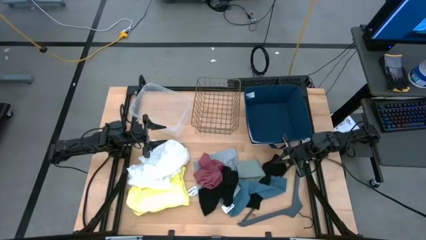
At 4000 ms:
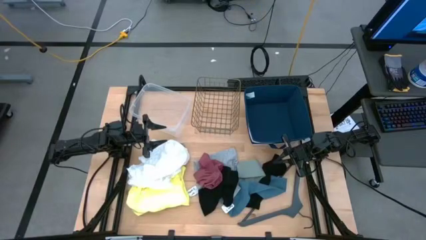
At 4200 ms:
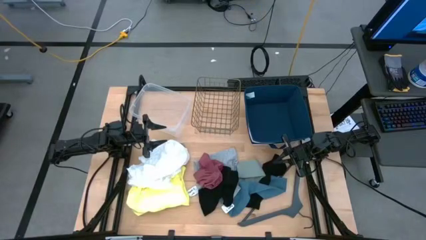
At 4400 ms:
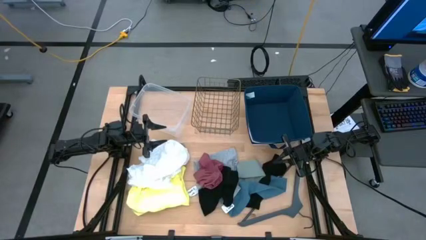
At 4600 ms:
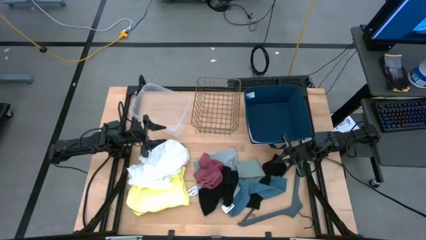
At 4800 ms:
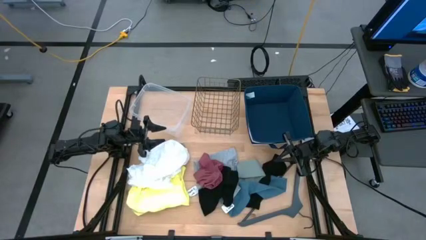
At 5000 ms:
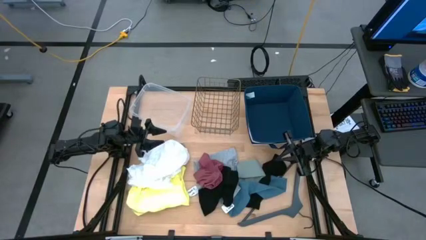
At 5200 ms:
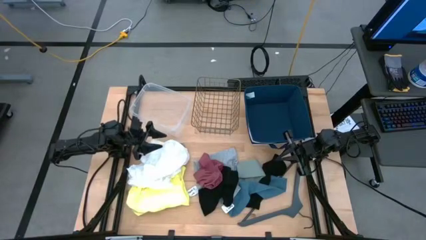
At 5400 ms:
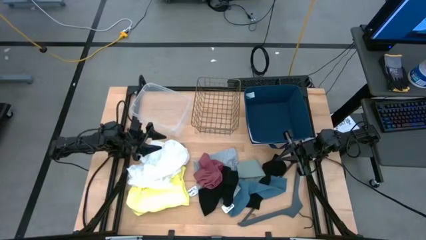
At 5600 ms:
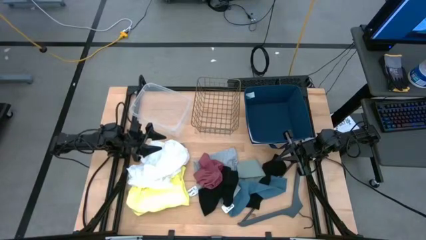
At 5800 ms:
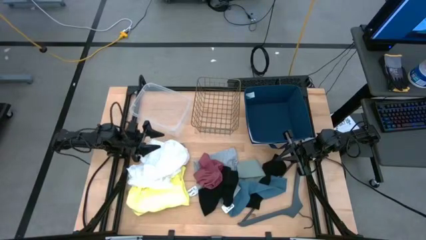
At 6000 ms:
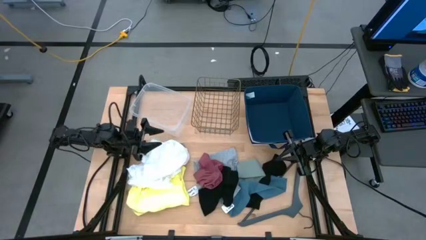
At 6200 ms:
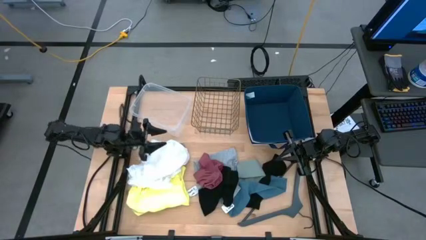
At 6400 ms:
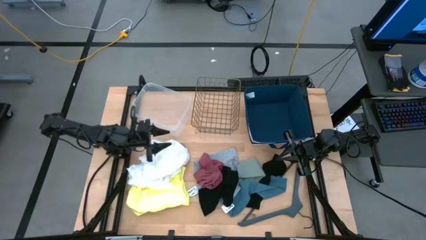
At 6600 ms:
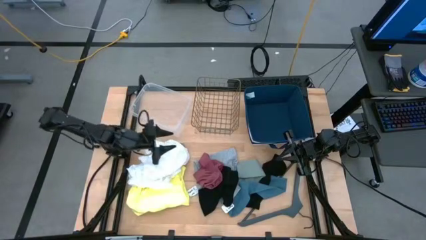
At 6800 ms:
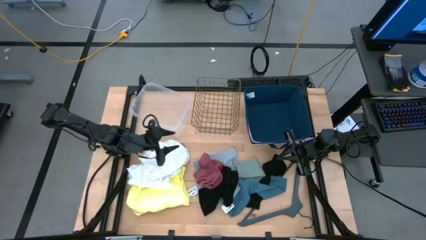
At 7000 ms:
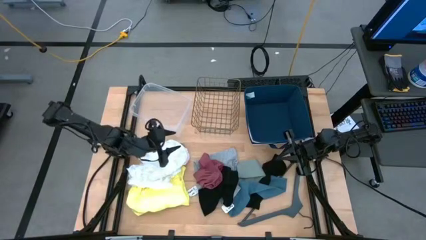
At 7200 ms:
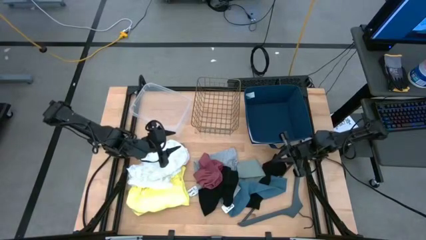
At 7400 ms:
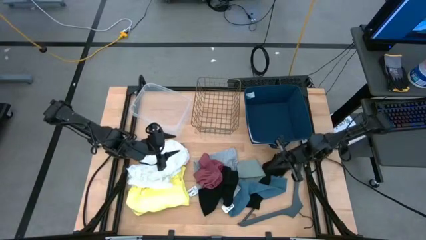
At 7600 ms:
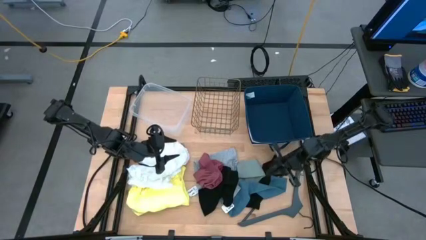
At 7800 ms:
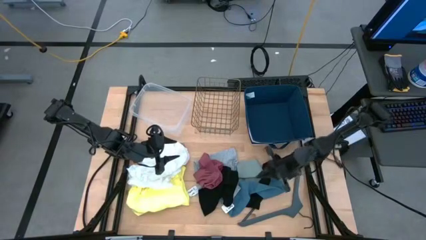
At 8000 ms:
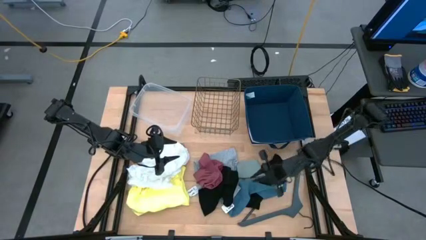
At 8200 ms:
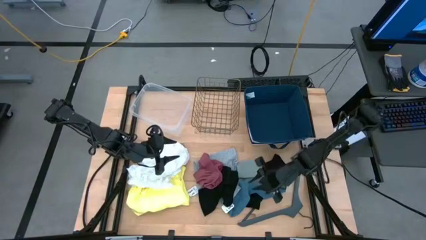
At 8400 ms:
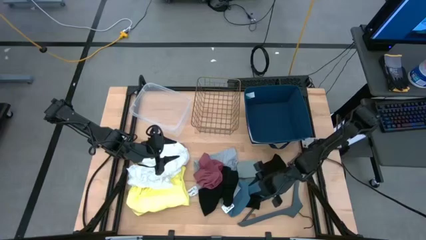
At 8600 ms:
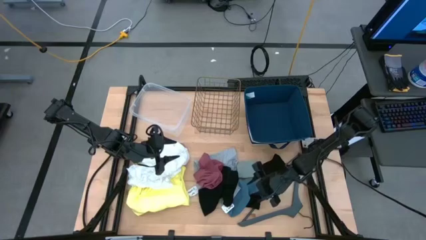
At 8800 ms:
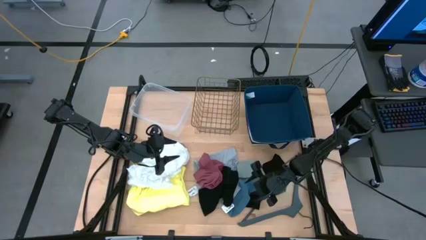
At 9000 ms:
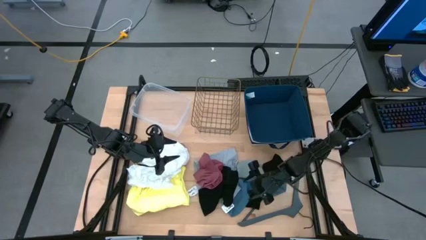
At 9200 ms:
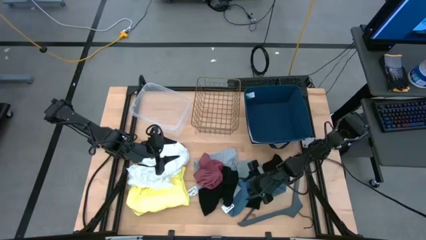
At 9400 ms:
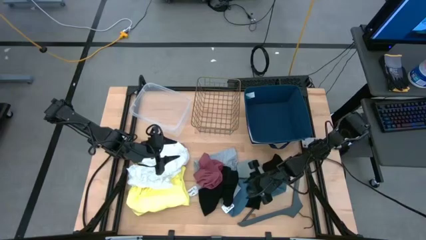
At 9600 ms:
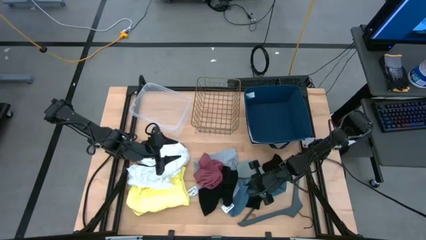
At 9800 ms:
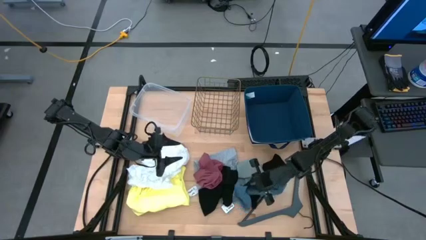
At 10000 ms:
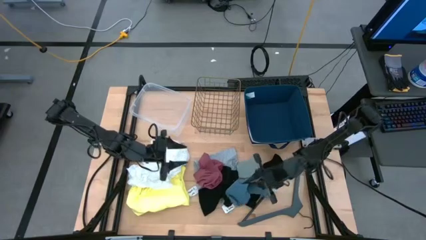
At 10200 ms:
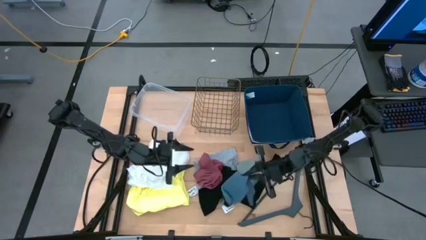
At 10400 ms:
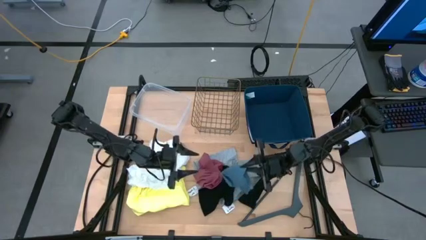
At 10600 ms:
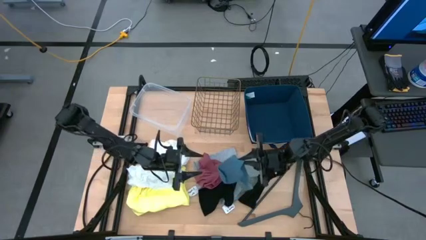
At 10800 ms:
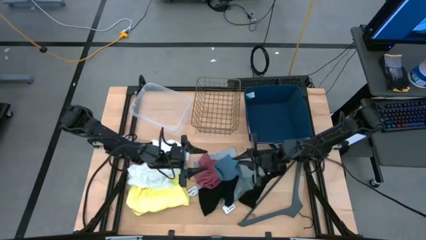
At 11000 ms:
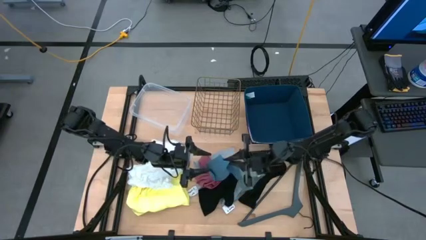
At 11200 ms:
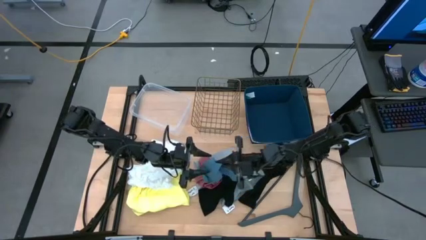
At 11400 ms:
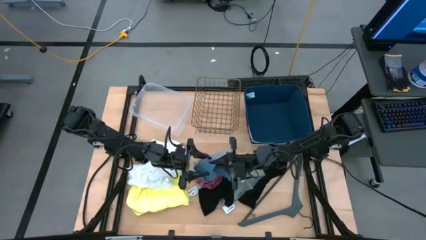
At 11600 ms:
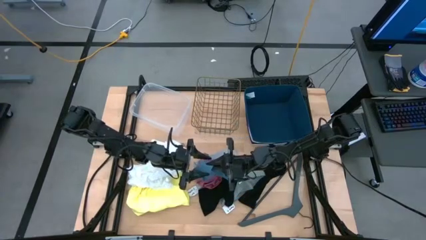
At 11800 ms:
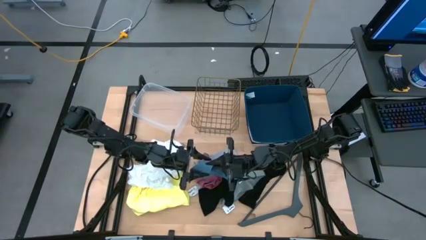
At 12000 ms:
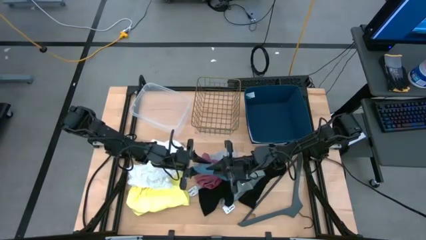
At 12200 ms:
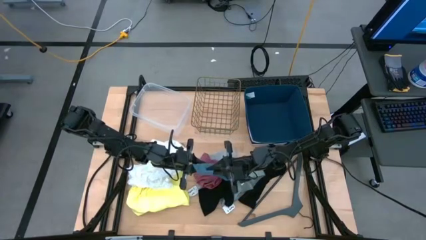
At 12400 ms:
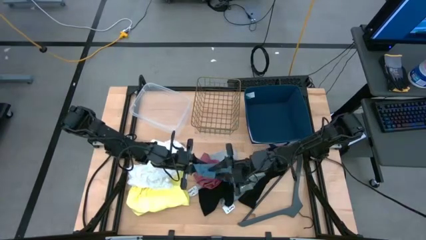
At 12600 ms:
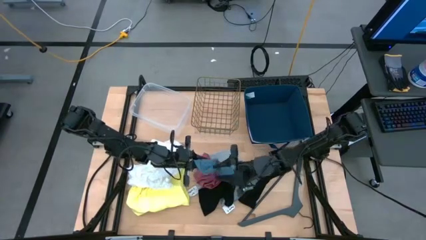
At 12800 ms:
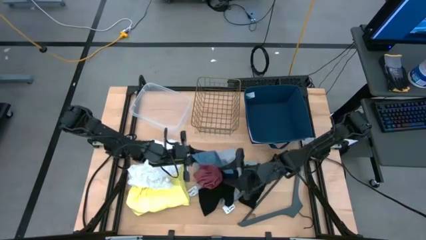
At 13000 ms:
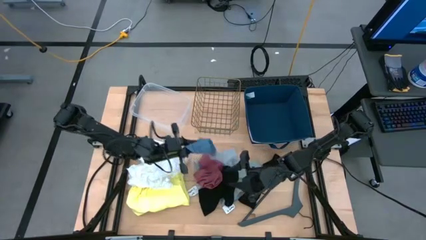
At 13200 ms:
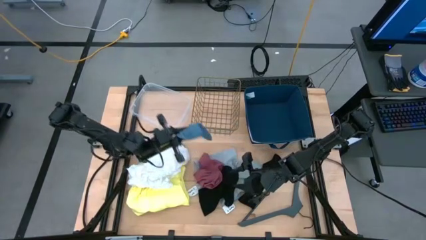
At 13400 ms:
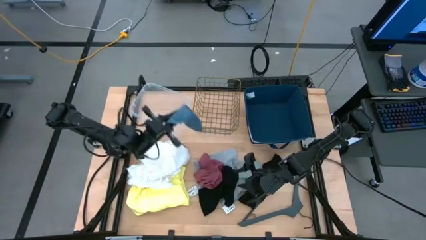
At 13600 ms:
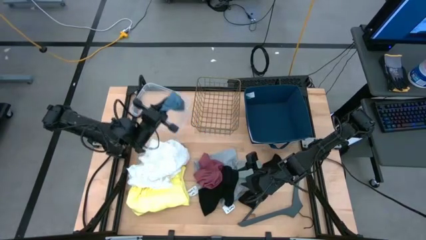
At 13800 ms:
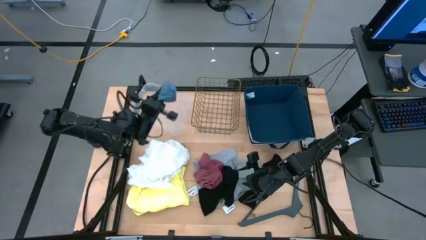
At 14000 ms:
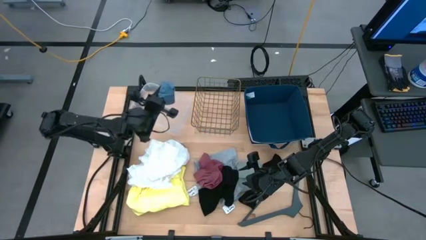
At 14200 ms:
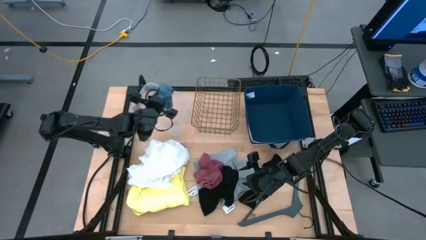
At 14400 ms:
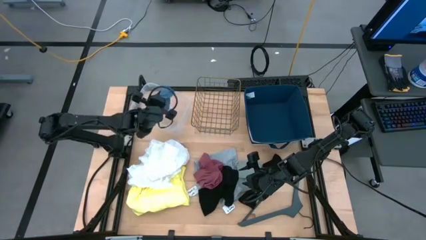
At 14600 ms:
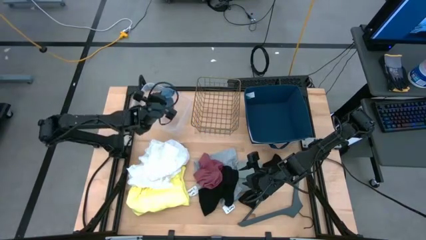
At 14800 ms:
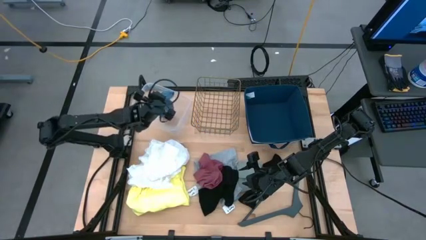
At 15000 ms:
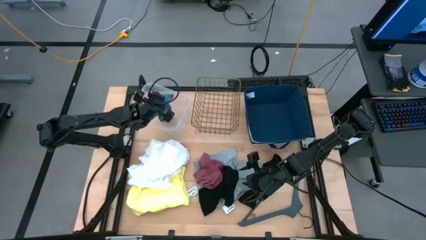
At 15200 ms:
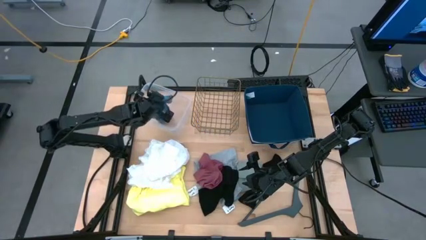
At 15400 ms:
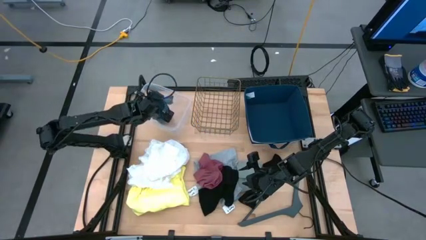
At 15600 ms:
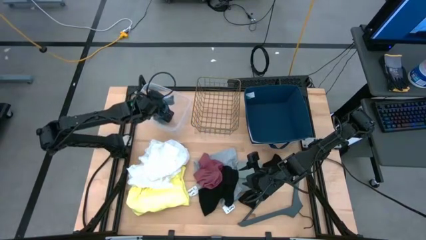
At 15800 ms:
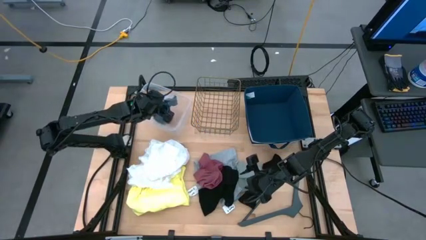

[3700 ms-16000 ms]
Task: Pick & Place Cloths
Put the blue sock into the transparent bin
